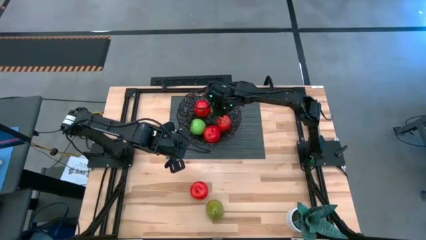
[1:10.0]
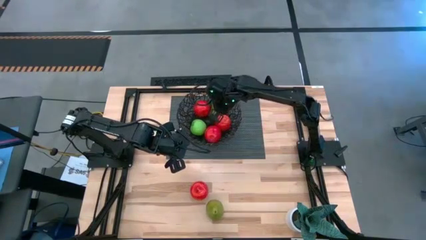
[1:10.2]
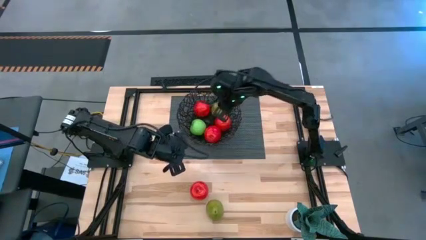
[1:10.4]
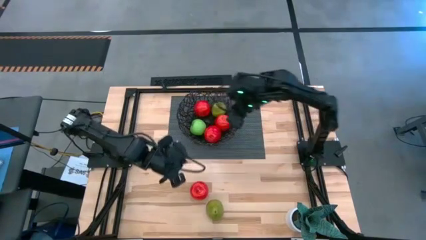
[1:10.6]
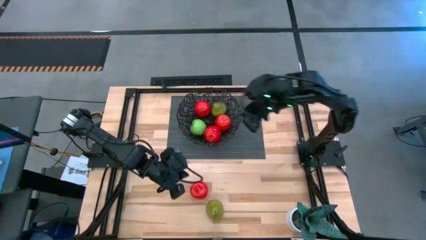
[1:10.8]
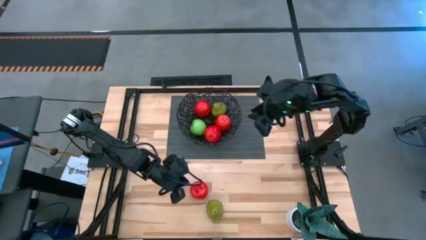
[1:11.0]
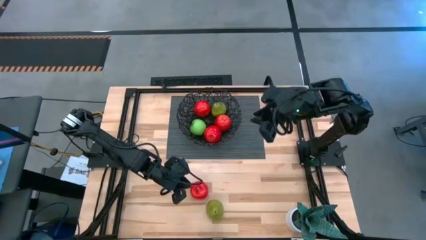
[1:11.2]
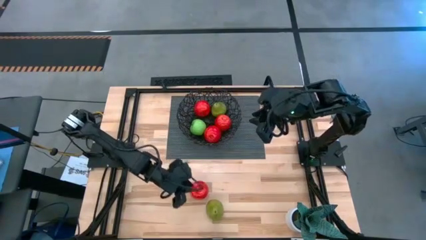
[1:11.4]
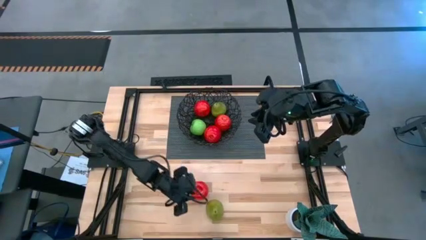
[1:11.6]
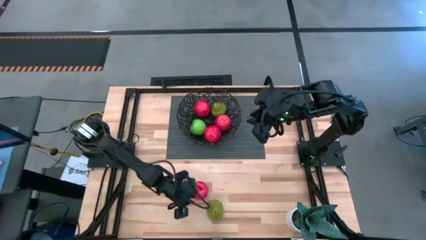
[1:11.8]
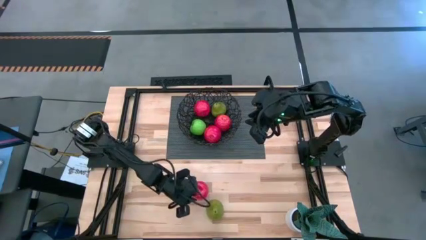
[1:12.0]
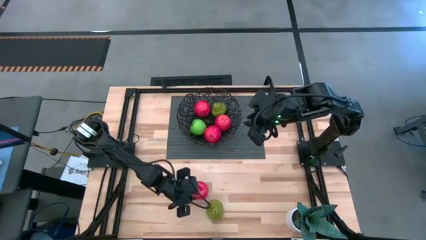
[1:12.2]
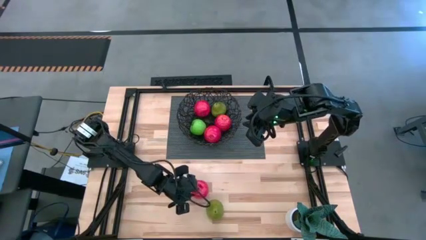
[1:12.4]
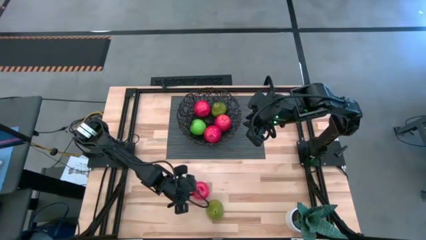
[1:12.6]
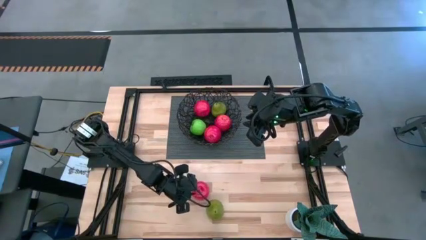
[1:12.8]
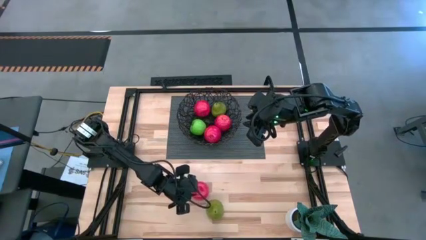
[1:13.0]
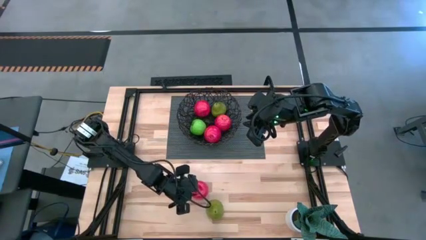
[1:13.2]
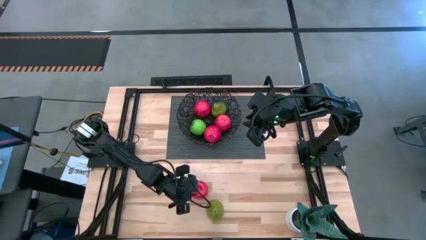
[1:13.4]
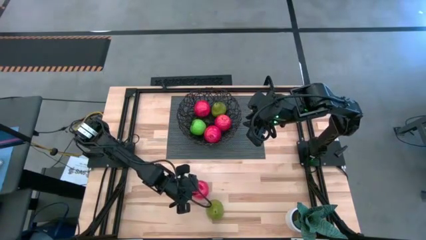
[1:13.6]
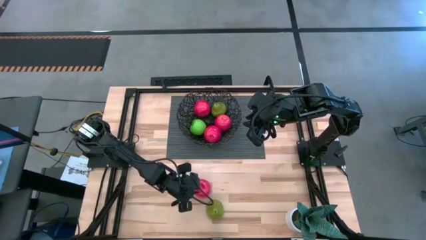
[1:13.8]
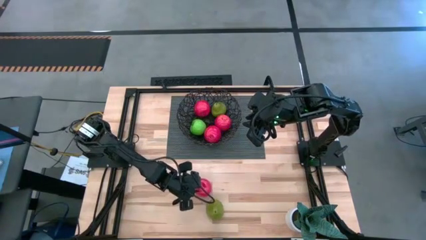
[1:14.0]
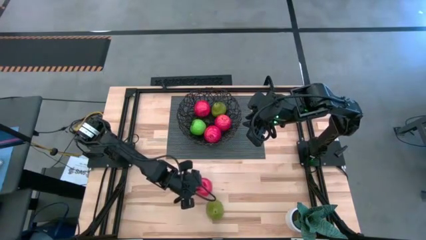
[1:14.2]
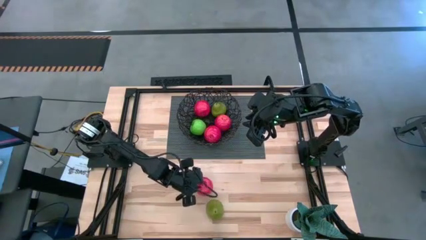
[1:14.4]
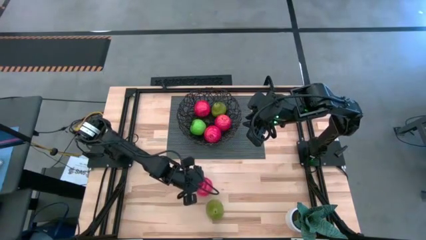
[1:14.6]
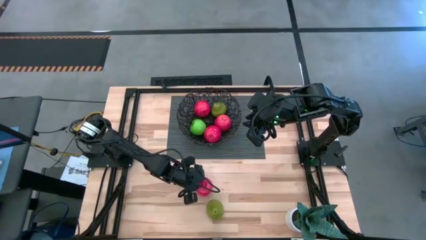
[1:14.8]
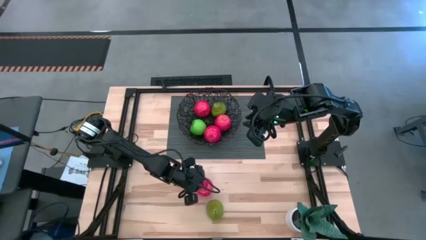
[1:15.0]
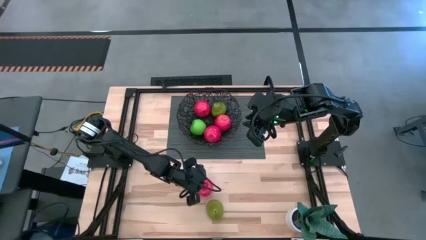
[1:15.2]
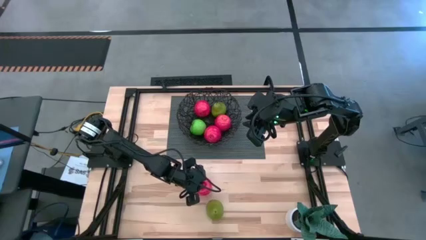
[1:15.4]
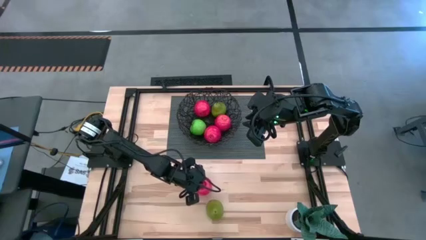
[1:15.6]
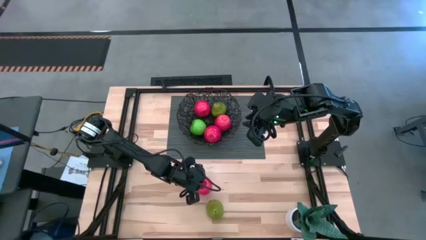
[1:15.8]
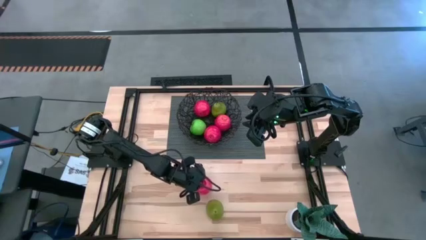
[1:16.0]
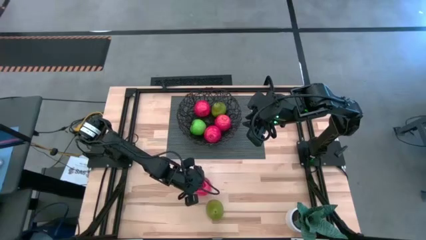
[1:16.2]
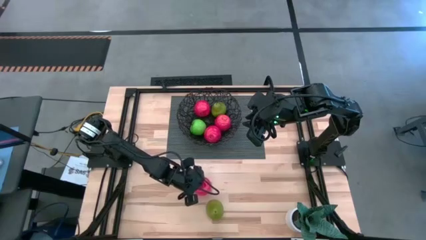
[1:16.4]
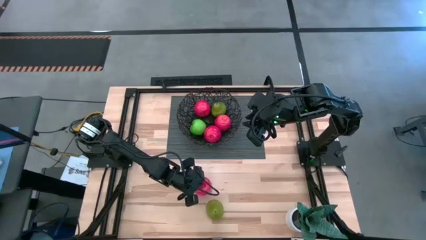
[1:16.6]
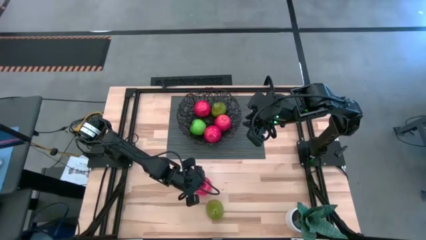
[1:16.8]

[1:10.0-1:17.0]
Task: Build produce basket
Put the red apple into the black basket

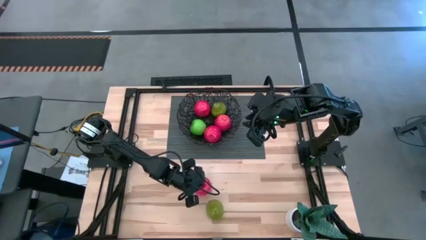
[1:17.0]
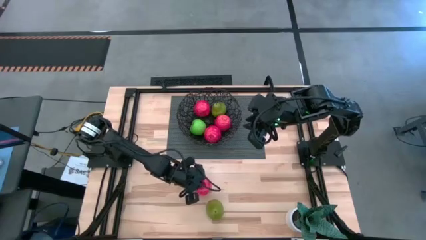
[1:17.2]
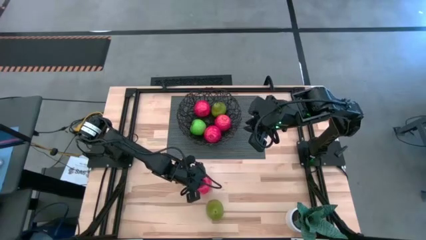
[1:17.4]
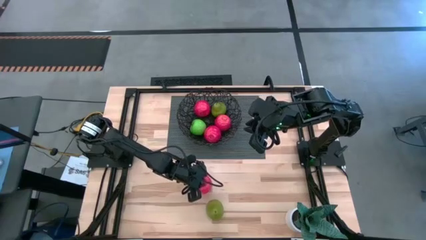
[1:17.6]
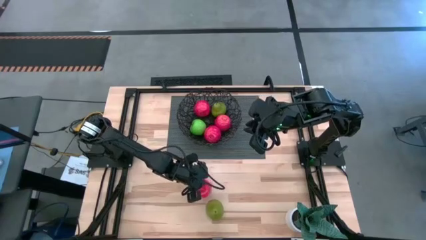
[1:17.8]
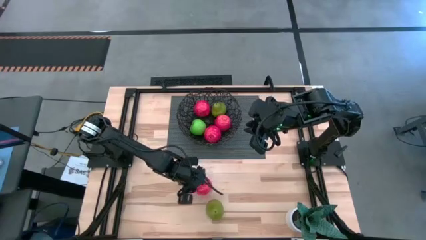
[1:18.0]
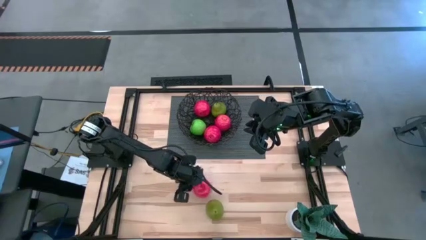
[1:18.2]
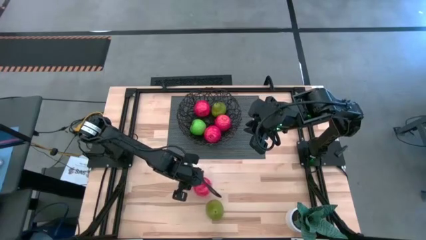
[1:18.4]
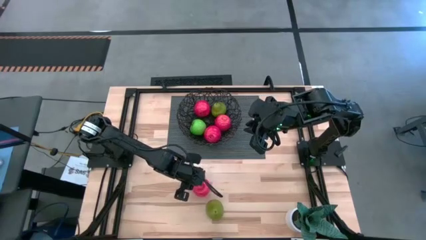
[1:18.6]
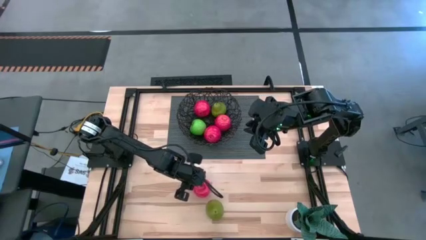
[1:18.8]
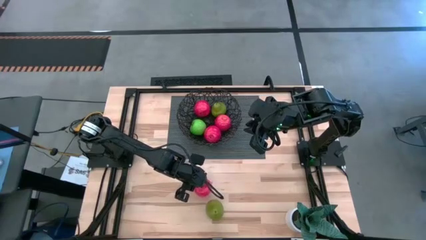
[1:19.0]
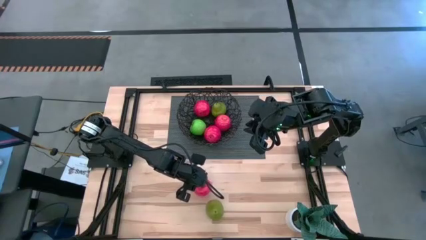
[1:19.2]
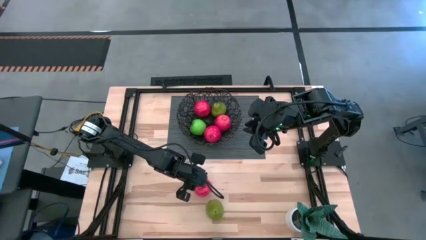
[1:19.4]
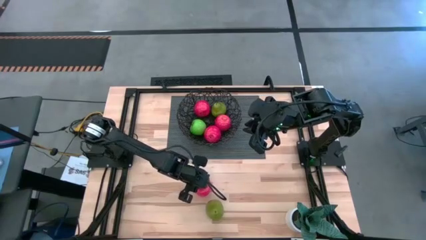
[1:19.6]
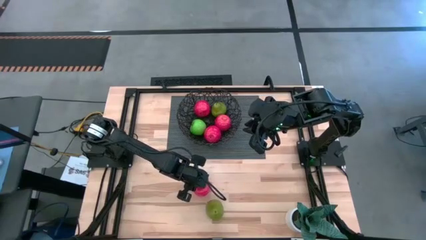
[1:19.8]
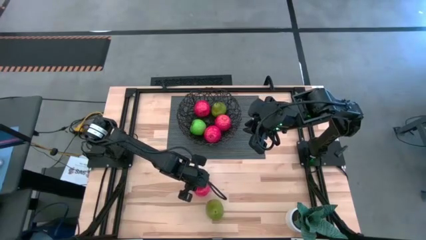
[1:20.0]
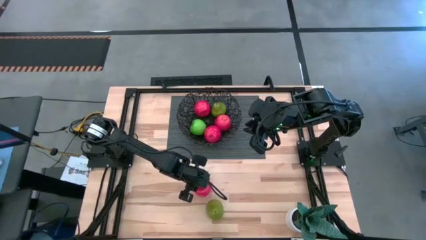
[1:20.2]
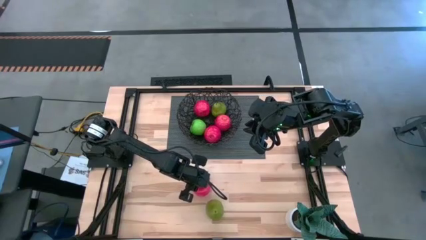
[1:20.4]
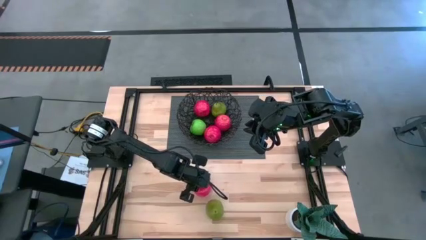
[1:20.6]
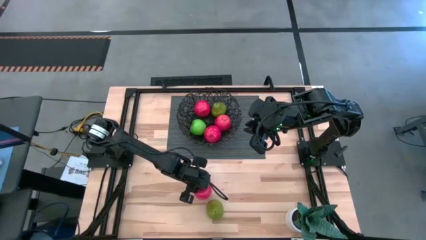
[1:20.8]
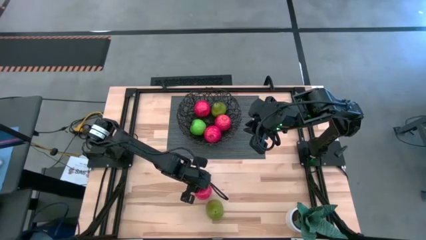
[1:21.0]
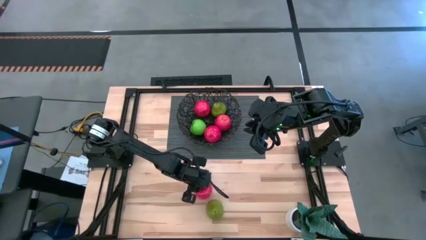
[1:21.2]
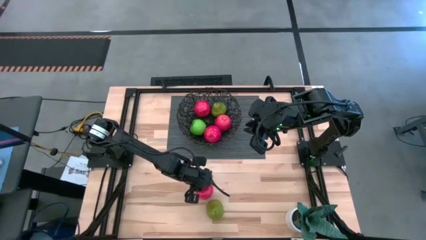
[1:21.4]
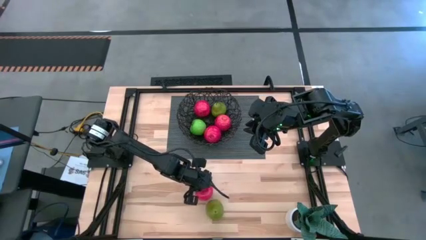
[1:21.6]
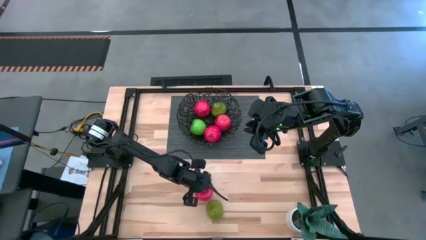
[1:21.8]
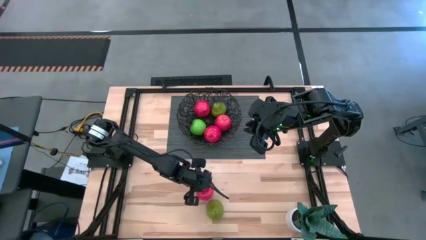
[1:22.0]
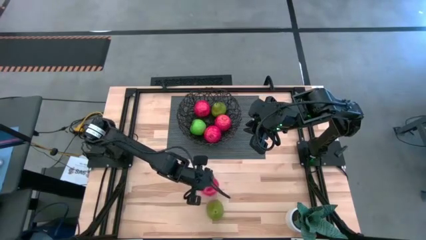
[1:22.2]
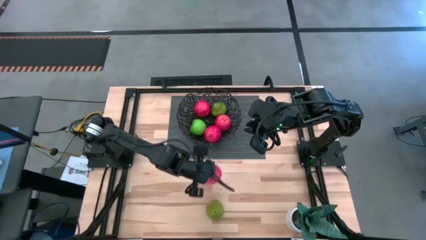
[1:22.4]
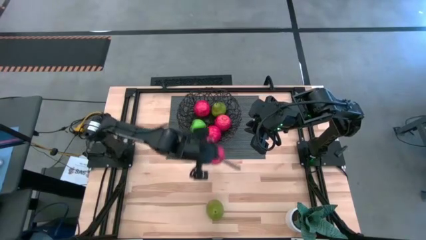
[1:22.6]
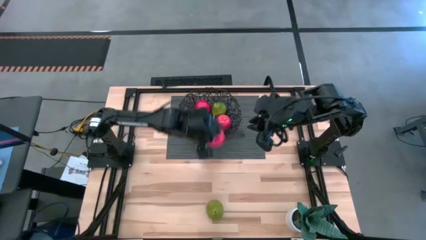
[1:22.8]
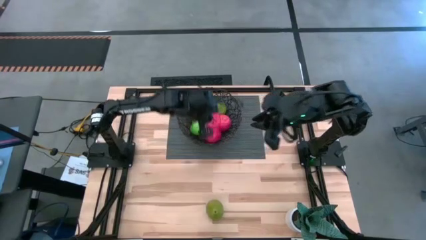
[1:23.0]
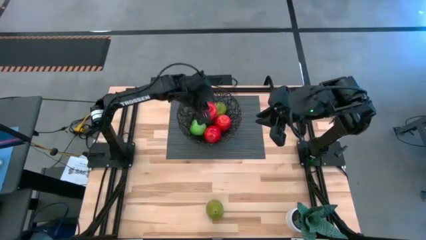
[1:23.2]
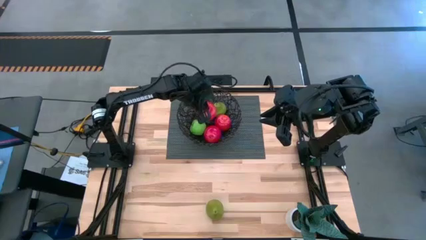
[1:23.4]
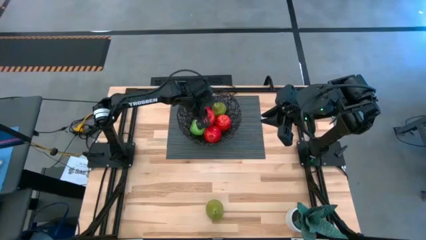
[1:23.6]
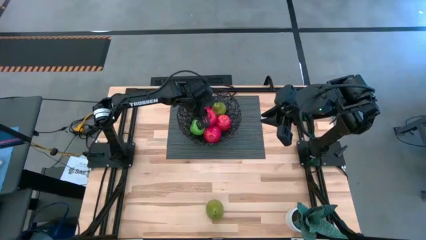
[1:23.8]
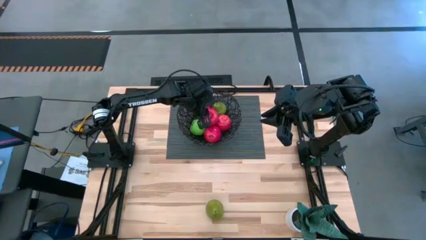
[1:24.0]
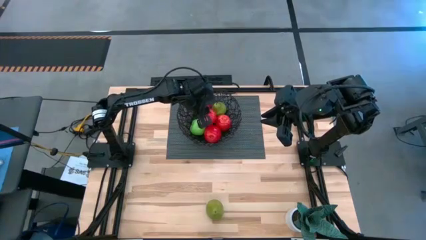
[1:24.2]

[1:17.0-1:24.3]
Put the red apple into the black basket
